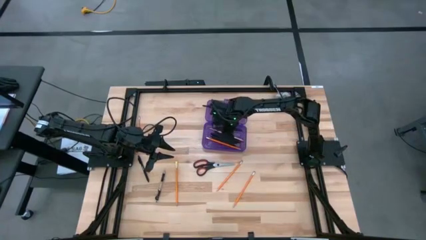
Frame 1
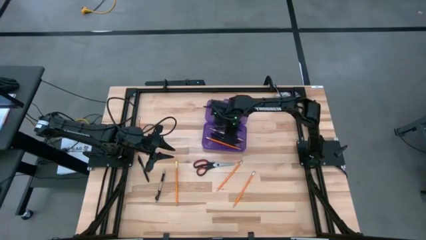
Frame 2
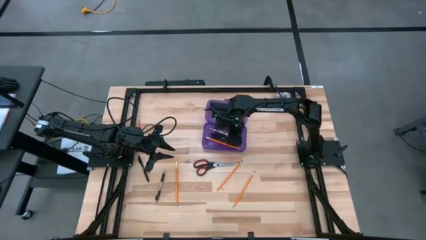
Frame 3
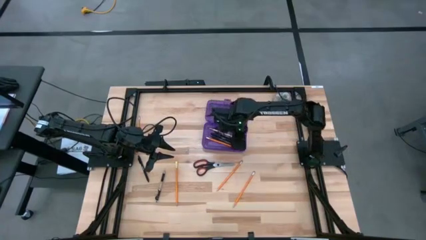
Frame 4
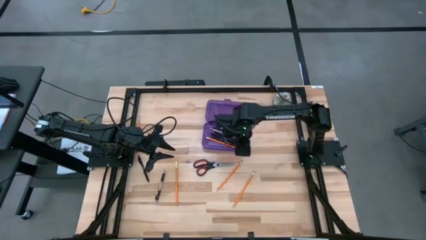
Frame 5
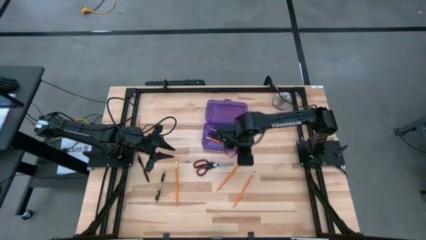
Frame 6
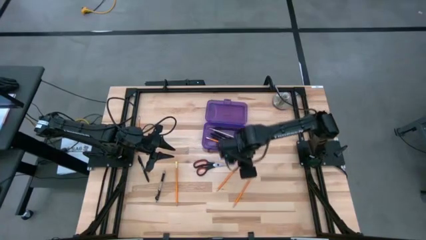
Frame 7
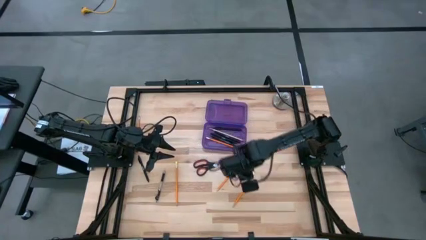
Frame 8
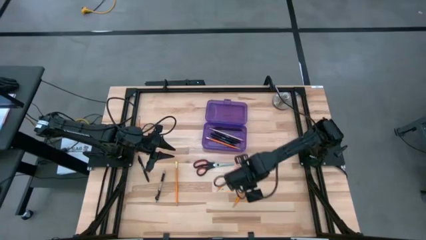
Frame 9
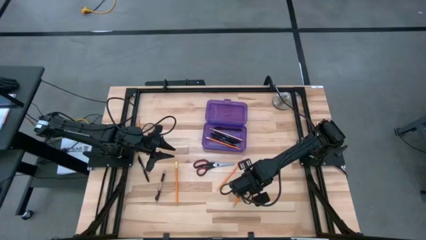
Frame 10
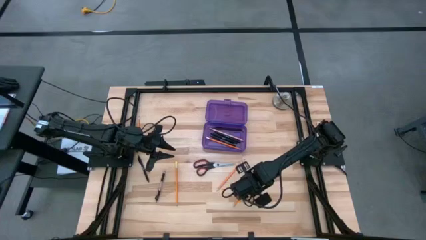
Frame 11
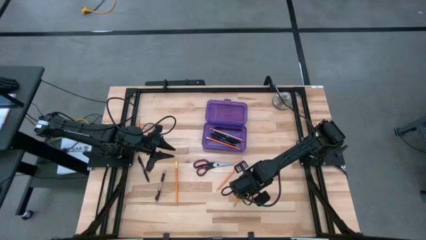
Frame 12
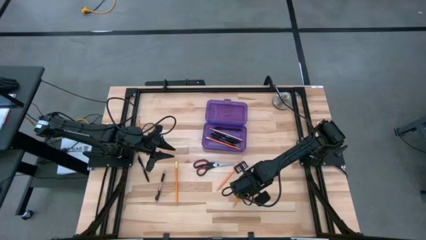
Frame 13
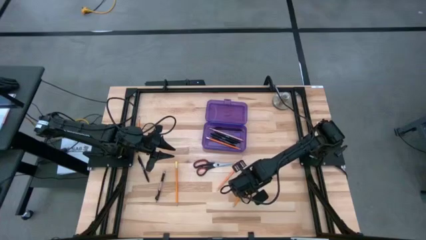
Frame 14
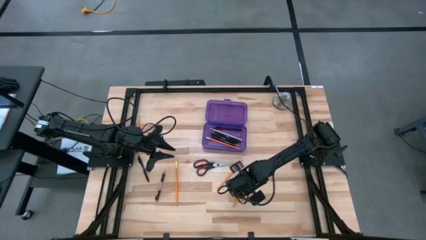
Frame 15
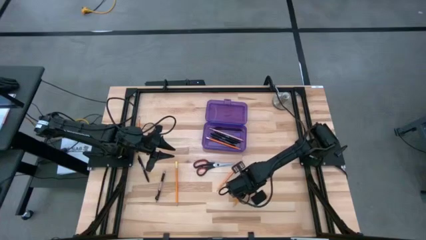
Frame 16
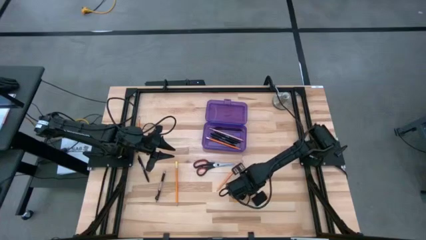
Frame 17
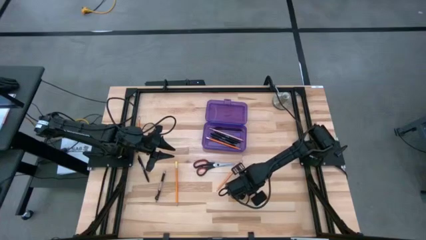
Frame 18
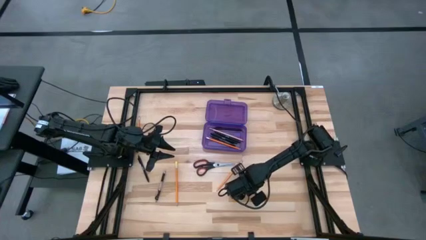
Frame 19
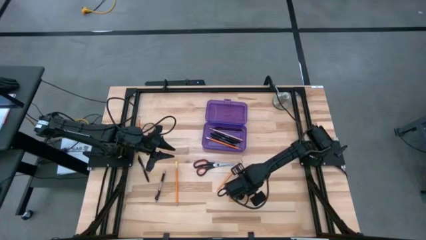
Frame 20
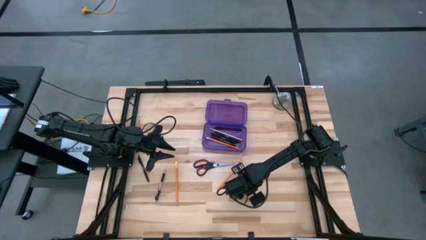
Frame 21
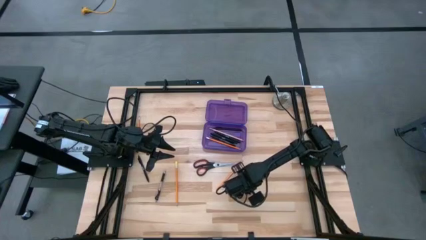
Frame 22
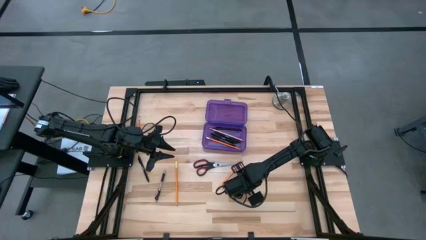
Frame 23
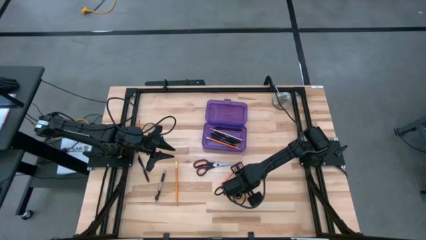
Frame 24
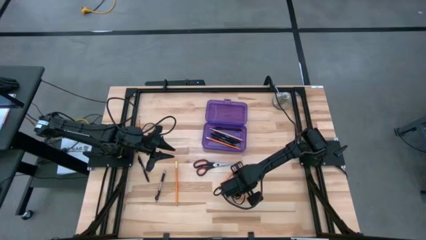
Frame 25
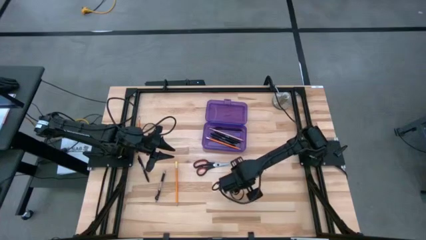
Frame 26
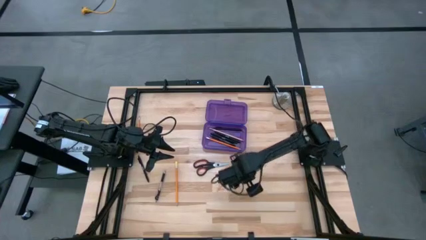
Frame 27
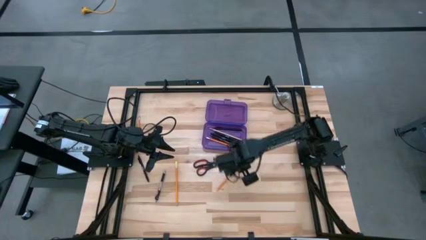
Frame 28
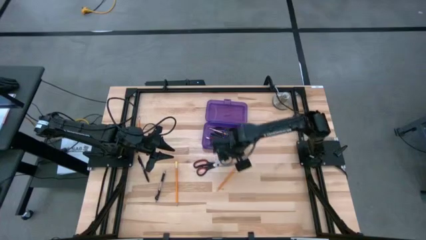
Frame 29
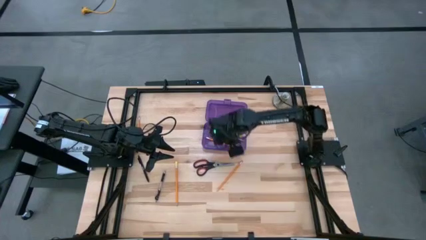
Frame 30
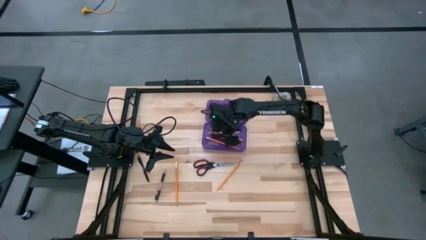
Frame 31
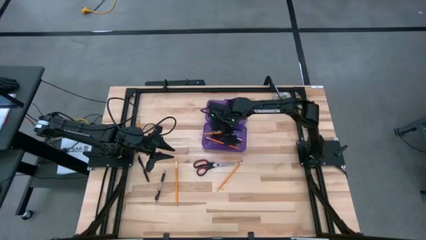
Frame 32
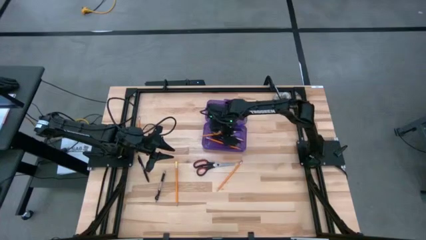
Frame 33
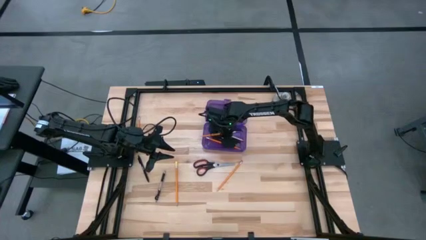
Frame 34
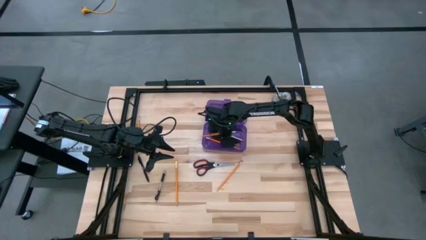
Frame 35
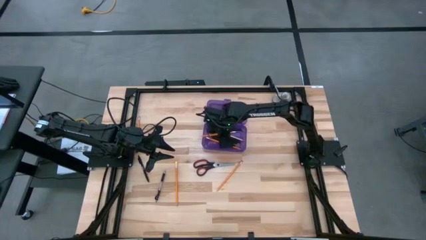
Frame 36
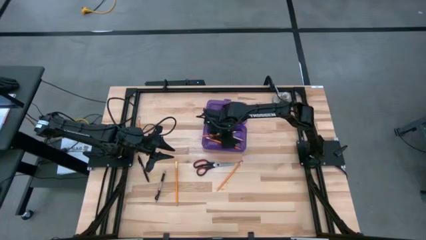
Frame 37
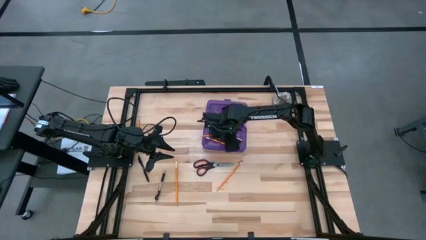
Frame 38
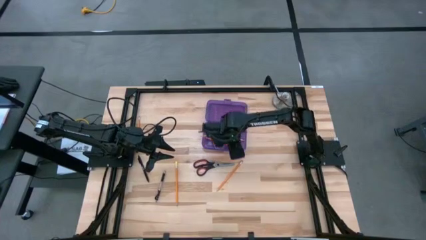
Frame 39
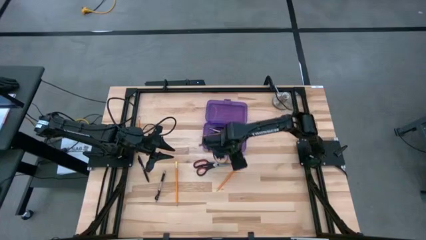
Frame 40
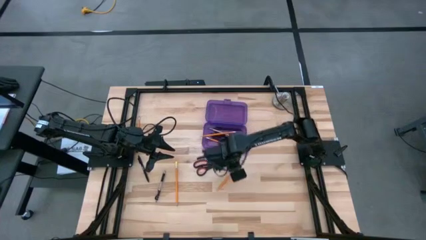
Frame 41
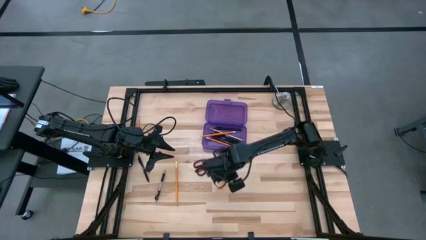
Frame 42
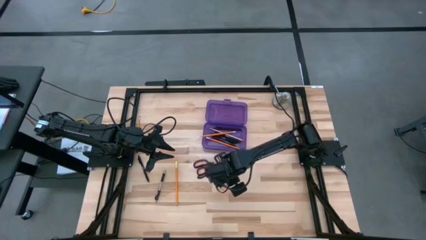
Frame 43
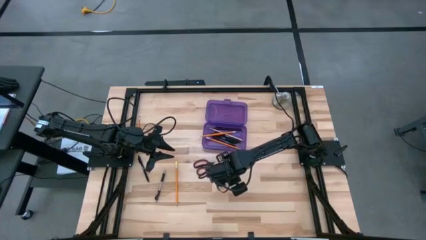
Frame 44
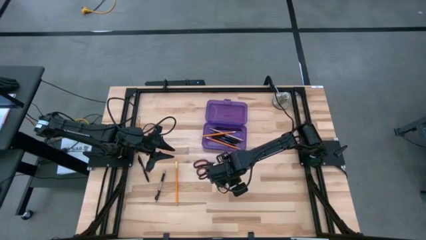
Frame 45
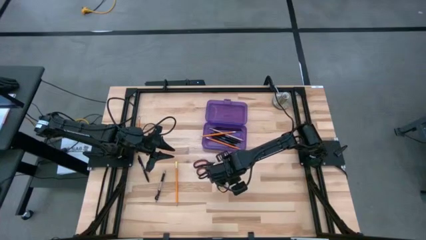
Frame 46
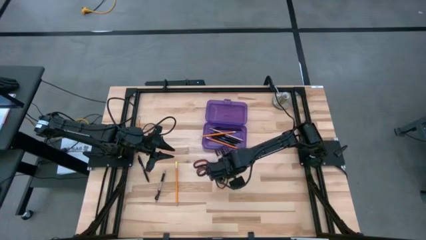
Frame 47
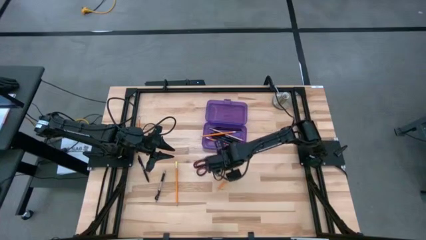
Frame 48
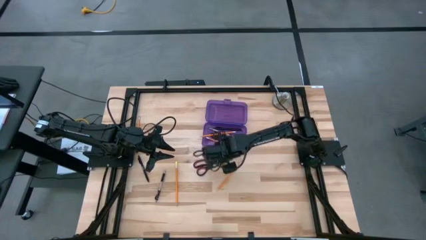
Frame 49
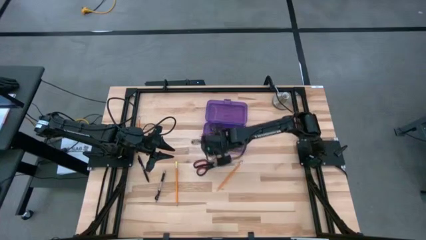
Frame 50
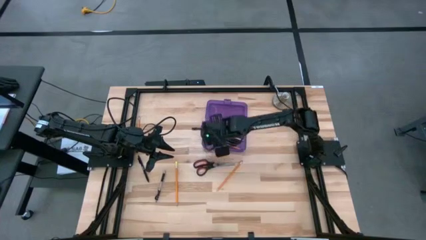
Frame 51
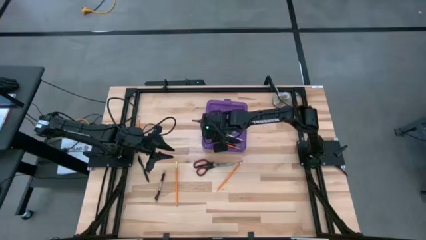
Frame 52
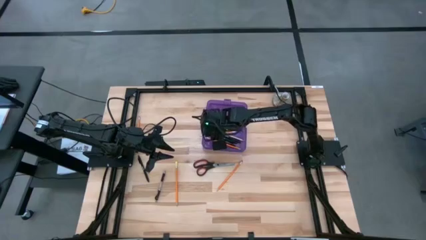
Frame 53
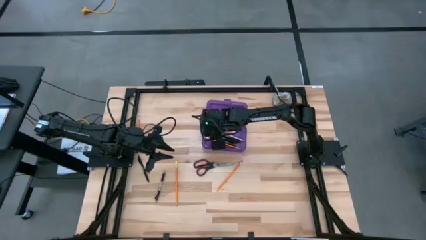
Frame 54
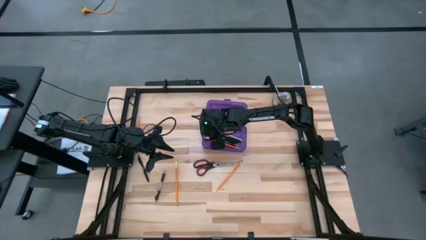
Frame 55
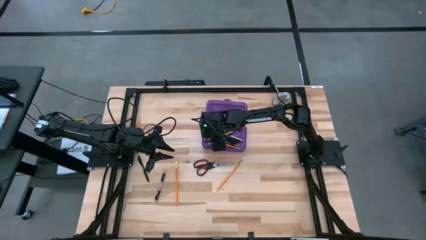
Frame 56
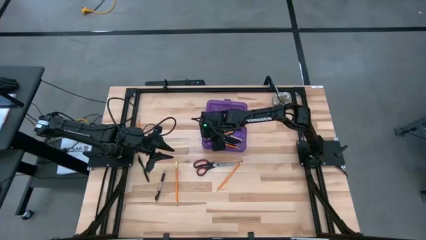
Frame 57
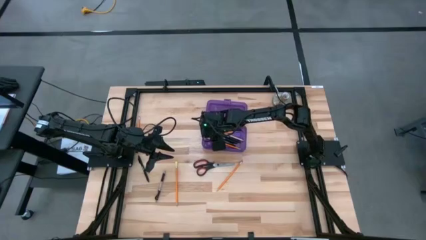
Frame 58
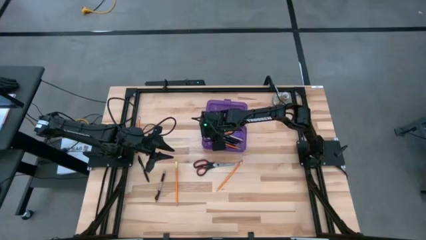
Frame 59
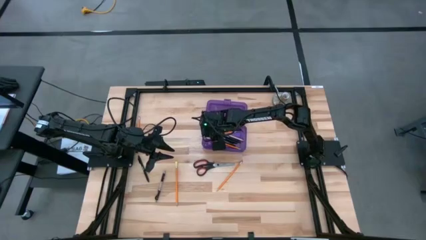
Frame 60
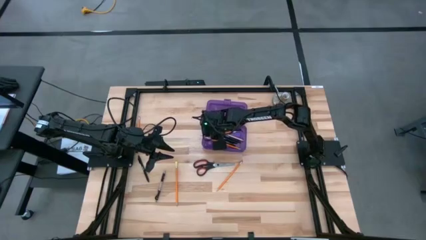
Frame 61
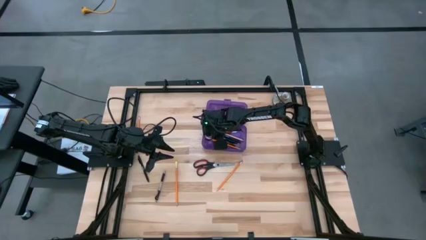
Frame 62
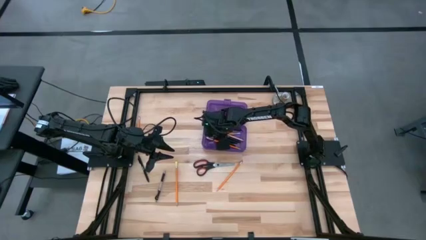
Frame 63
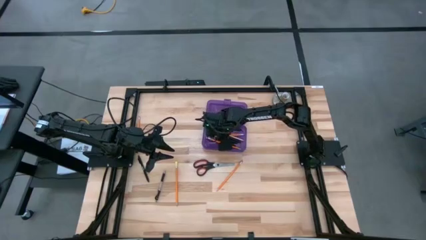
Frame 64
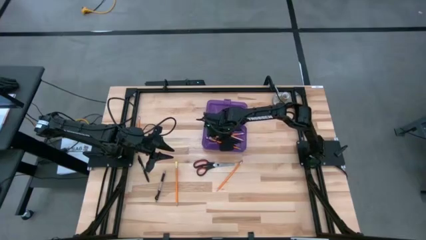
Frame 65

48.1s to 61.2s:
Task: Pick & place school supplies into a supply box
Put the pencil into the pencil box

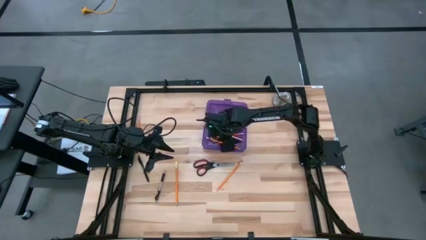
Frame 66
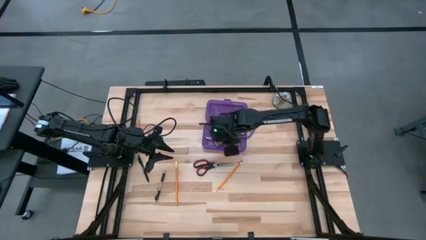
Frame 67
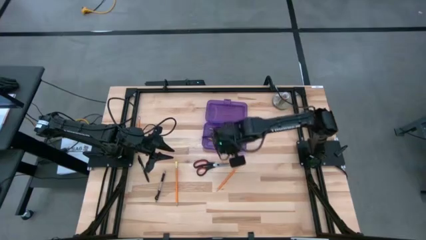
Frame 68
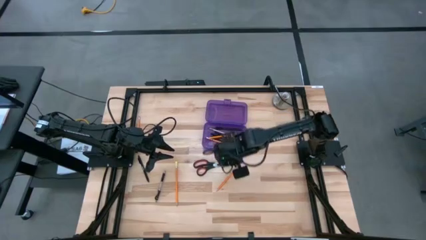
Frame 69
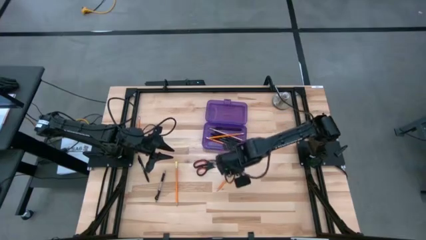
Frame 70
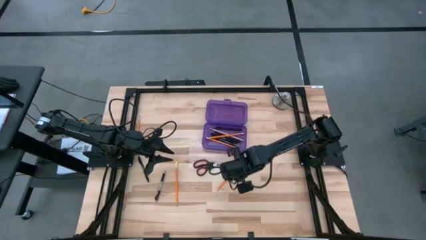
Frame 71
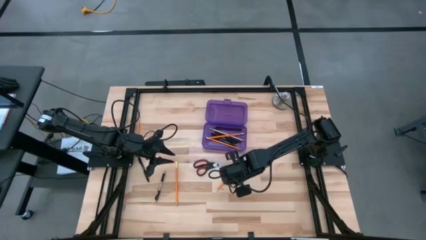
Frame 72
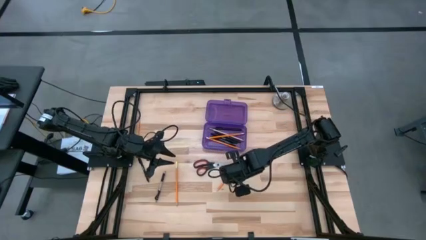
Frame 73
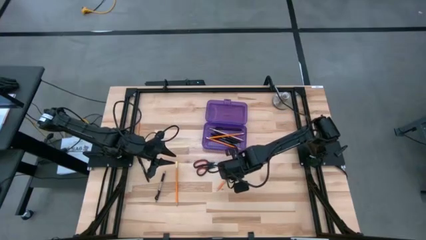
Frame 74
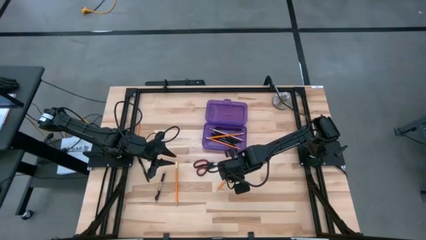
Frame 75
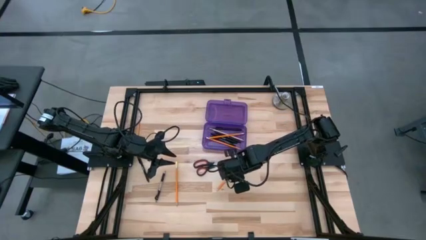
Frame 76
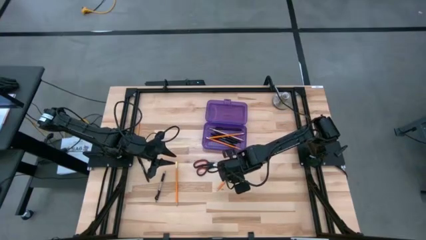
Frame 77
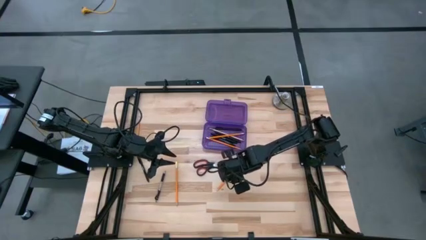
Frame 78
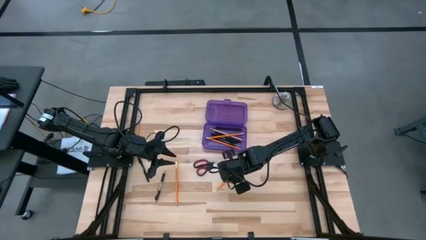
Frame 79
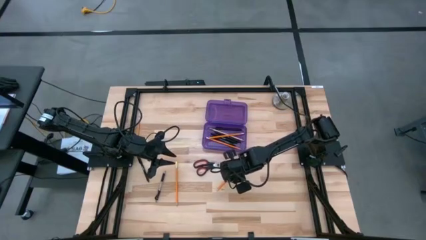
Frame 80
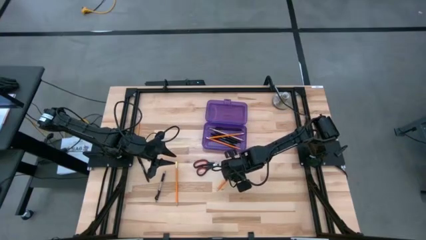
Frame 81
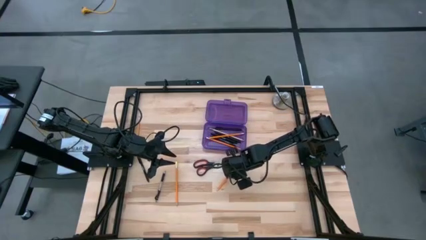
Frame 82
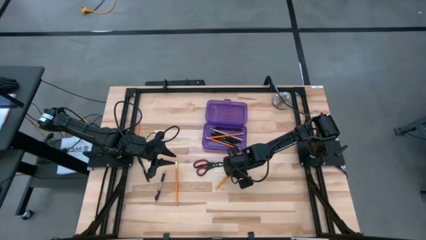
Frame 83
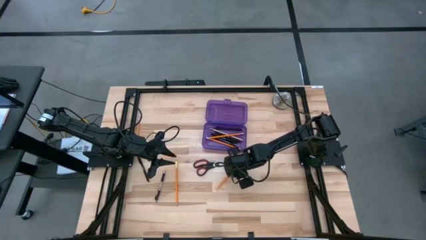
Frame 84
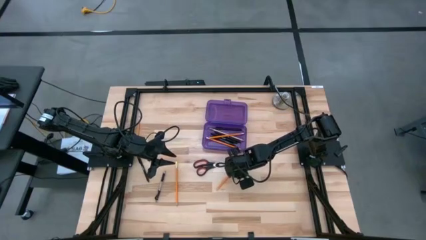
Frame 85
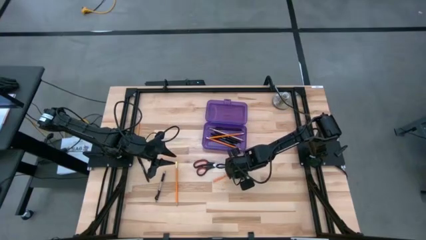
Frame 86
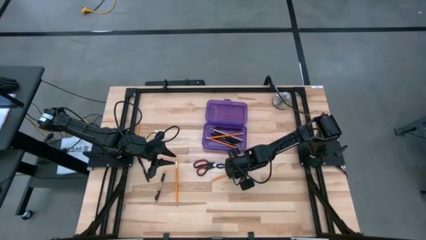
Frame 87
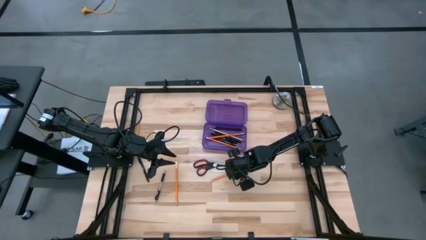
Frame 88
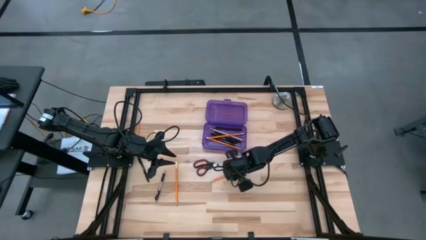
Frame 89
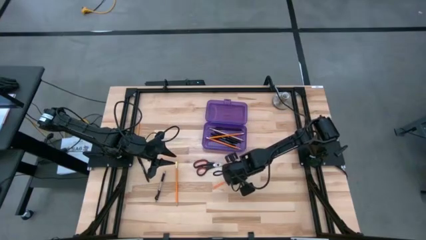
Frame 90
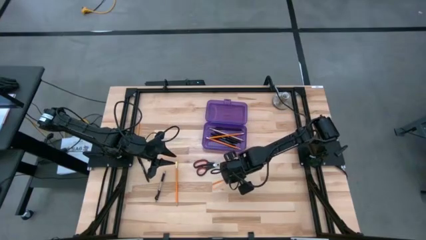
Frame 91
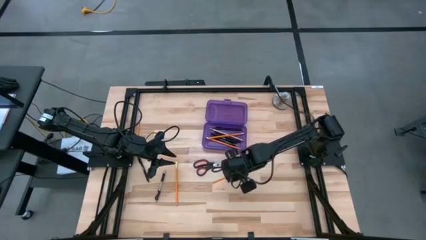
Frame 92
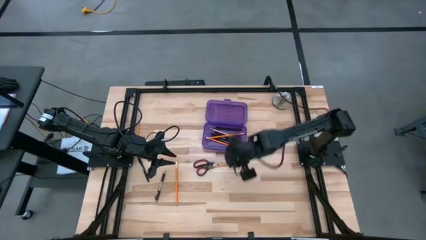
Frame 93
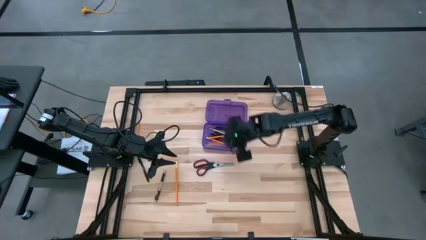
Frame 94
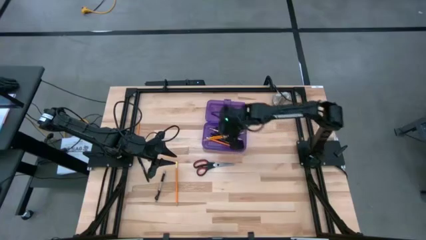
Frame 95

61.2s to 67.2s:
Put the right orange pencil into the pencil box
